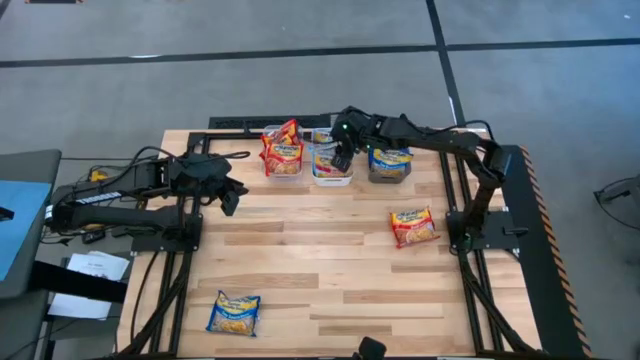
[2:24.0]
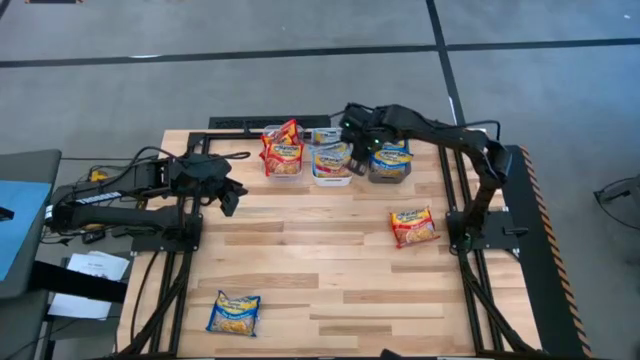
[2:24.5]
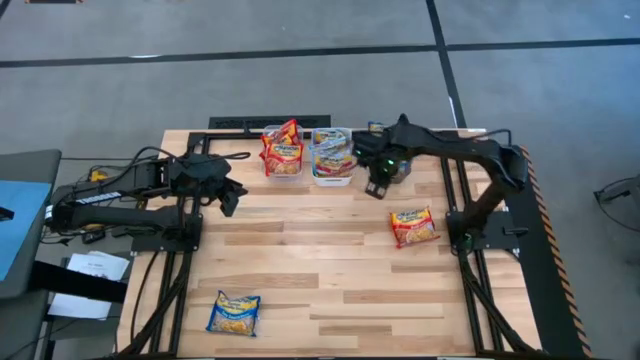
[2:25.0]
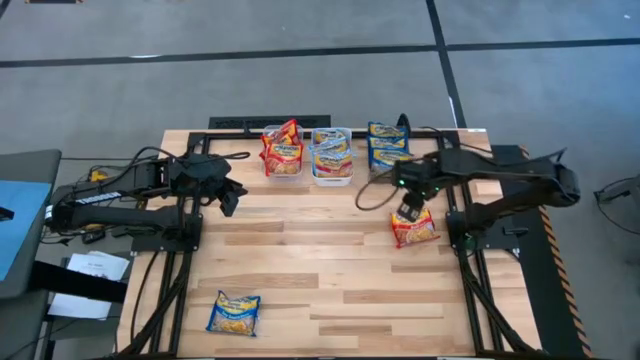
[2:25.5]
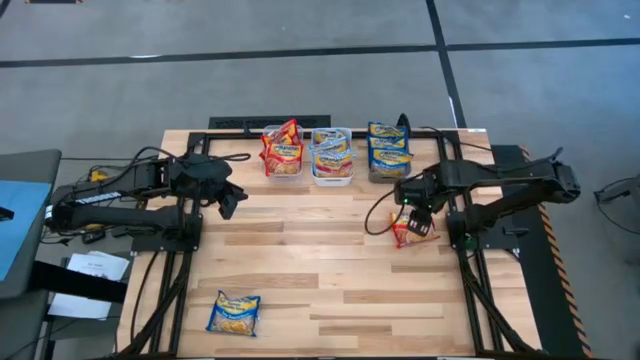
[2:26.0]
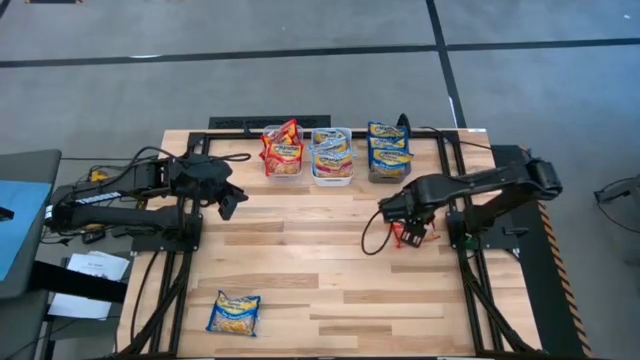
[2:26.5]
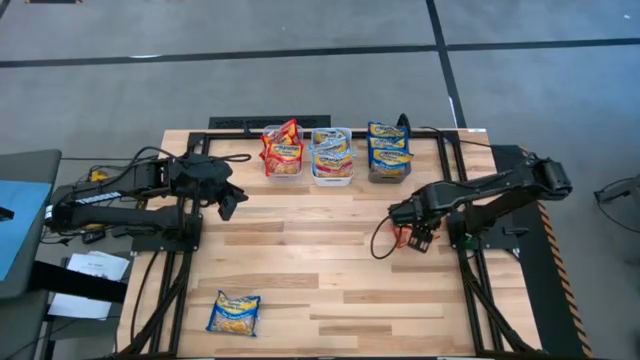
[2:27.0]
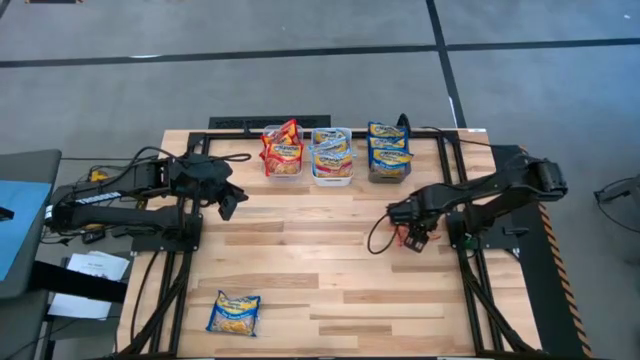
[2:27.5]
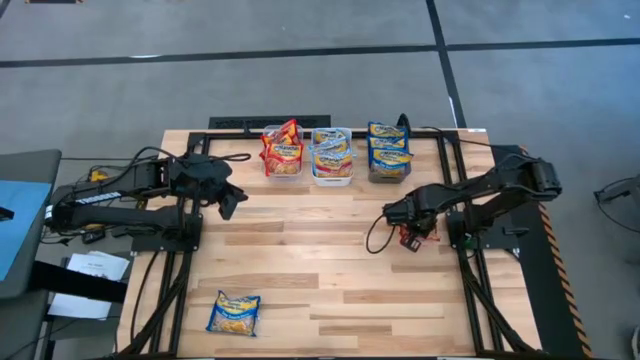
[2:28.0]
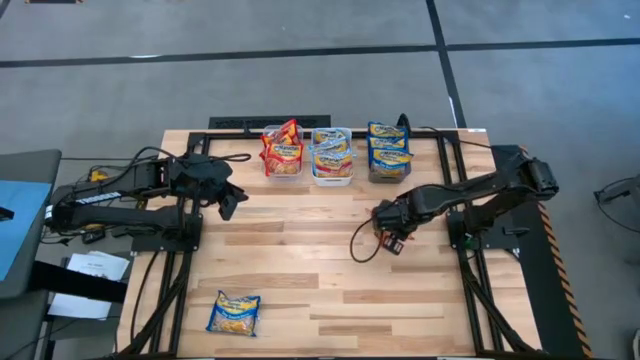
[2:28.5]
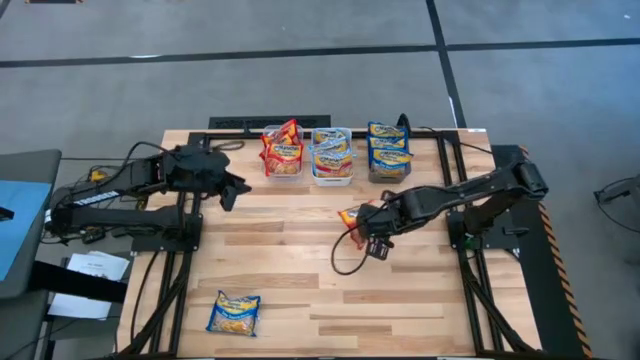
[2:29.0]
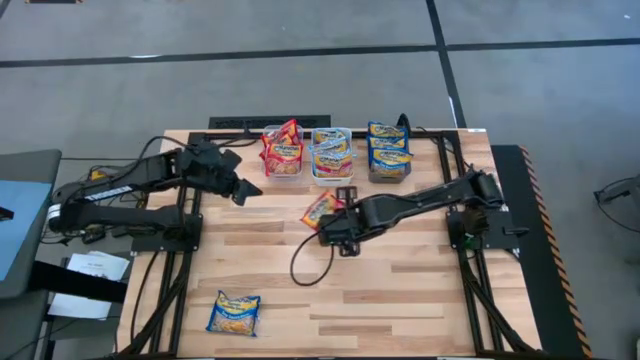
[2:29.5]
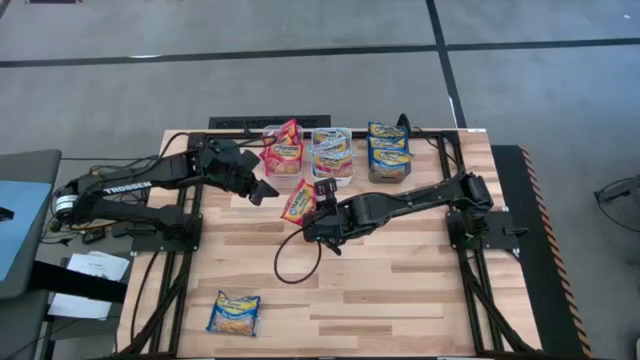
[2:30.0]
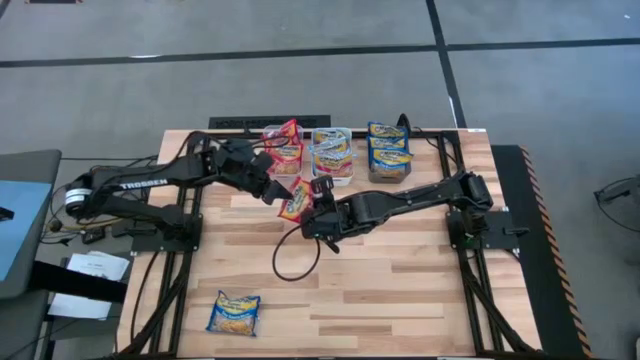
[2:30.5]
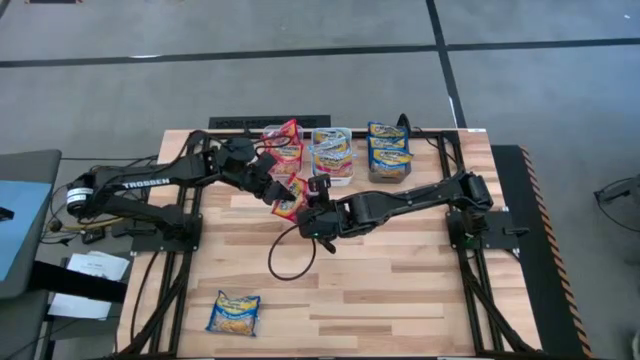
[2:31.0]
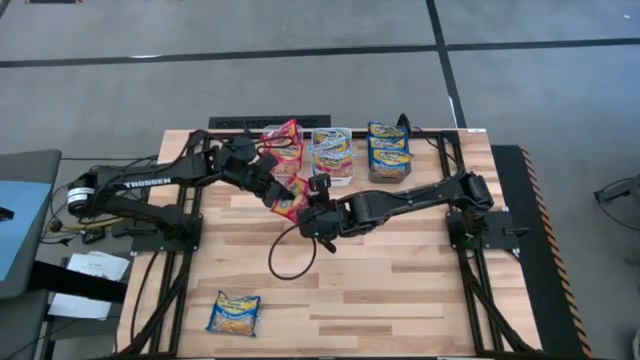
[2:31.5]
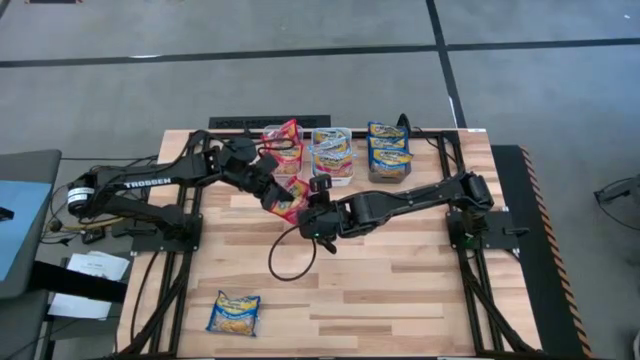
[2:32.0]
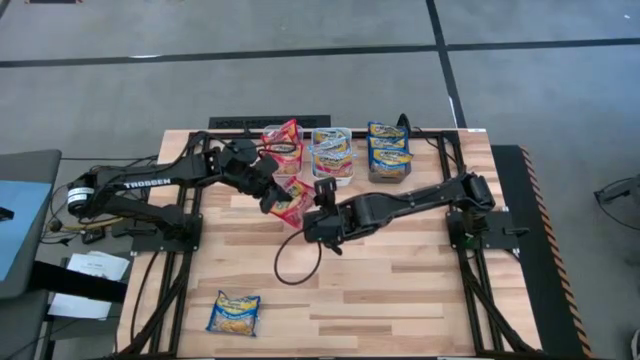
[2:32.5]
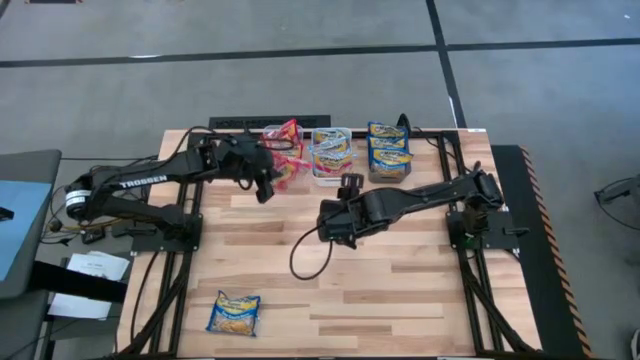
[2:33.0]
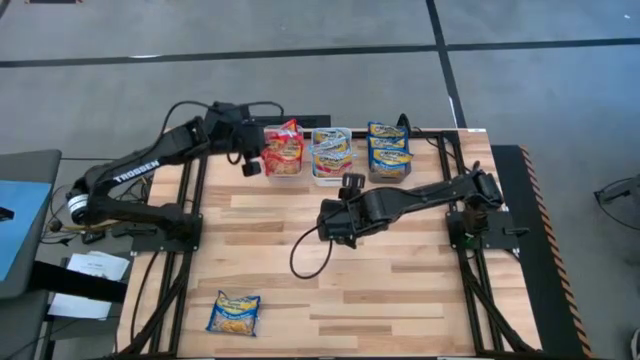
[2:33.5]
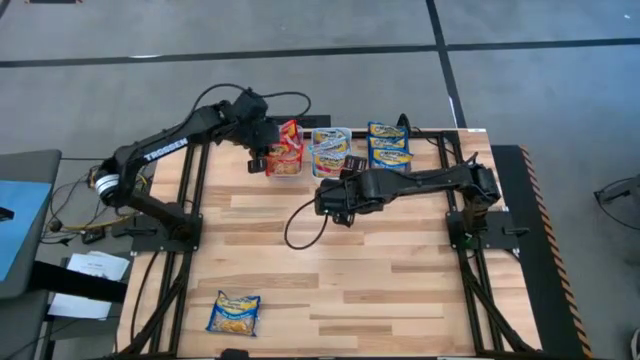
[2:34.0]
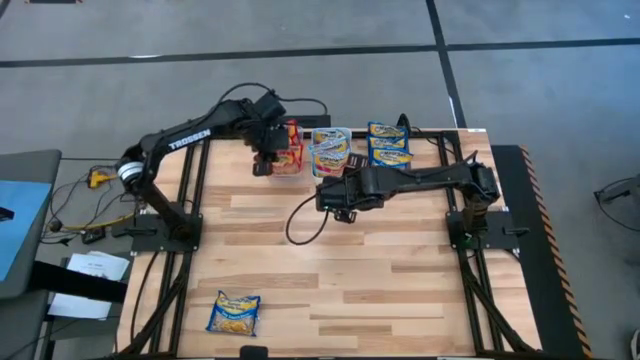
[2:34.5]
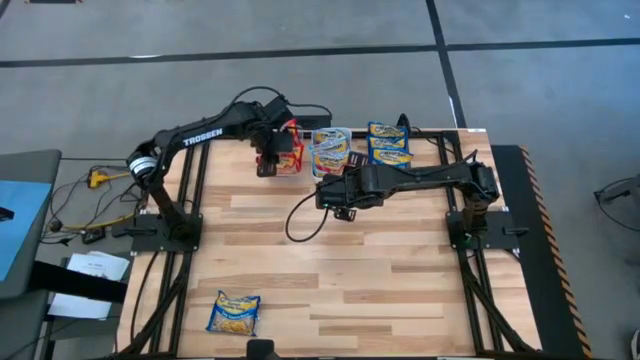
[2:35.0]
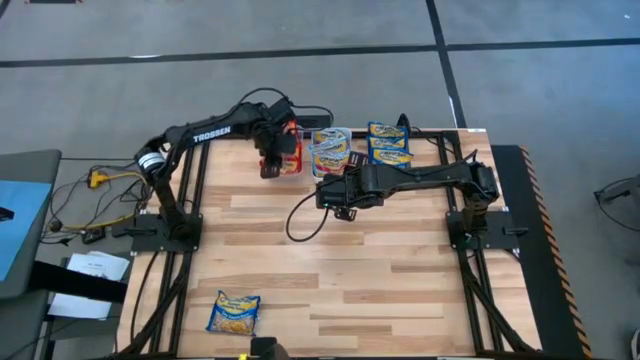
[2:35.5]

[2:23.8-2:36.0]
Task: Sort Maruchan noodles
Put the red noodle pack into the transparent bin

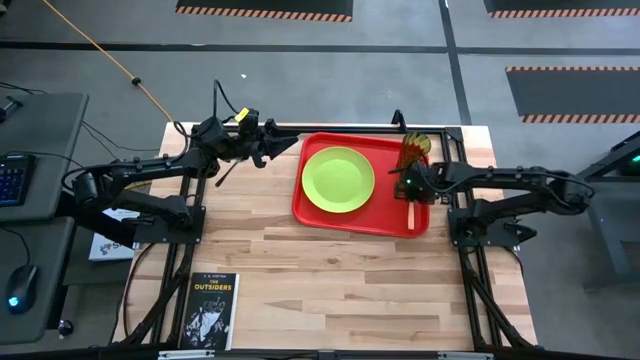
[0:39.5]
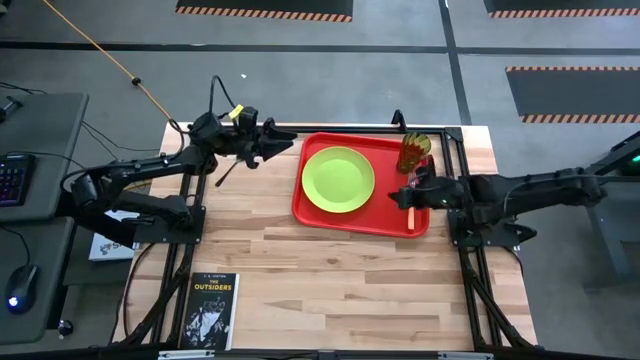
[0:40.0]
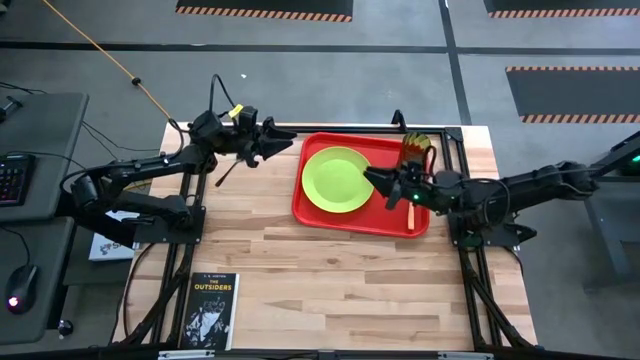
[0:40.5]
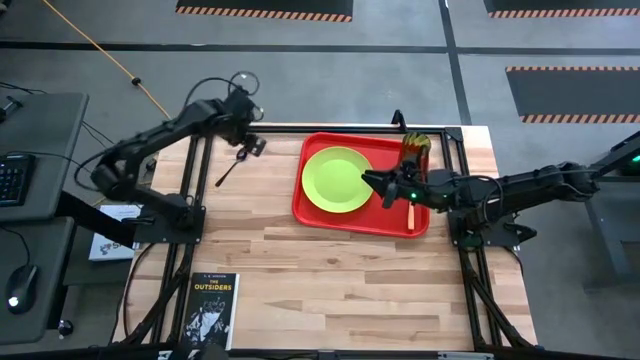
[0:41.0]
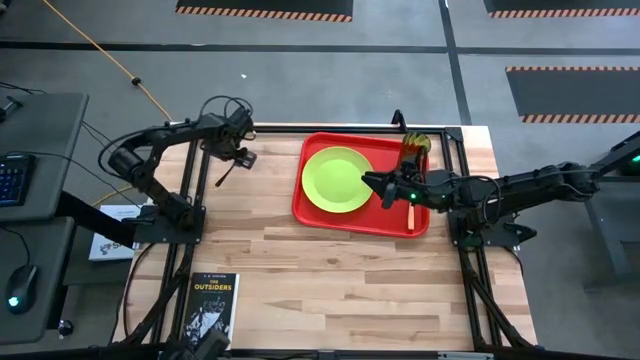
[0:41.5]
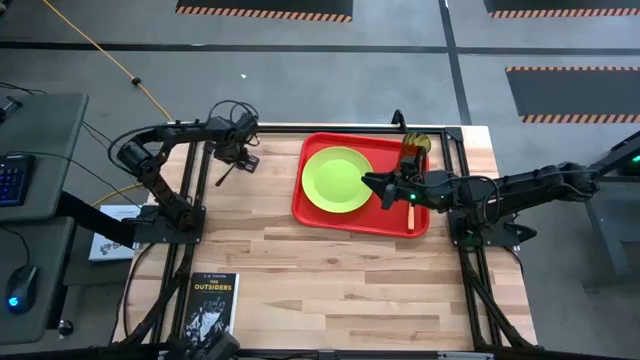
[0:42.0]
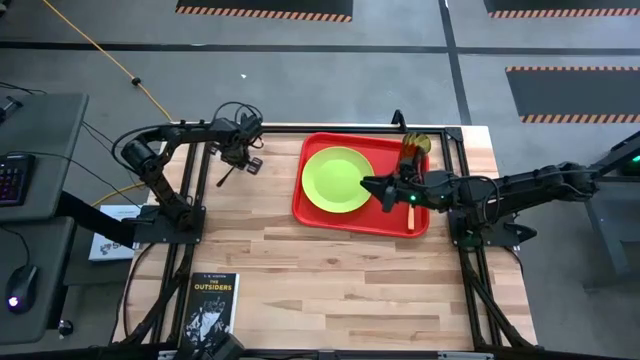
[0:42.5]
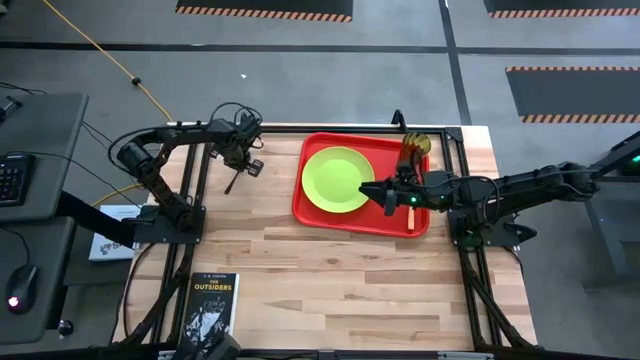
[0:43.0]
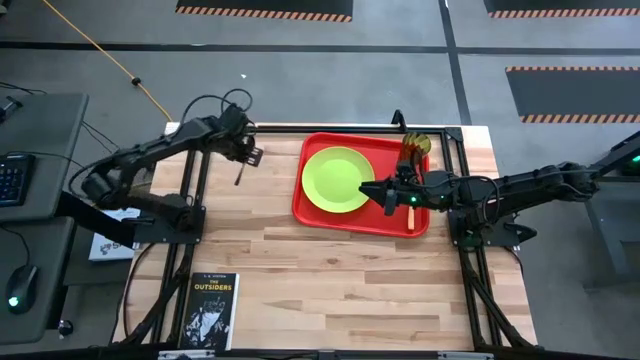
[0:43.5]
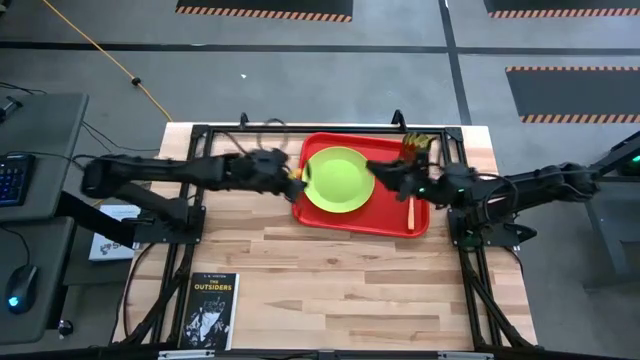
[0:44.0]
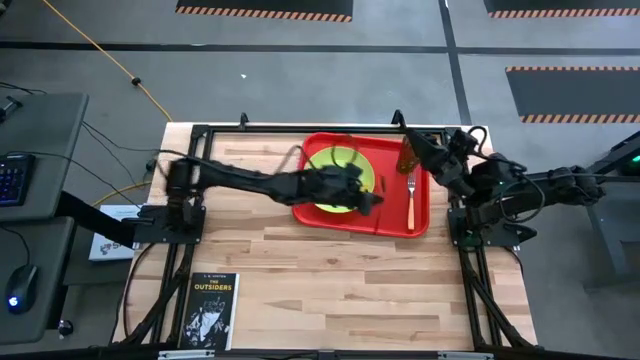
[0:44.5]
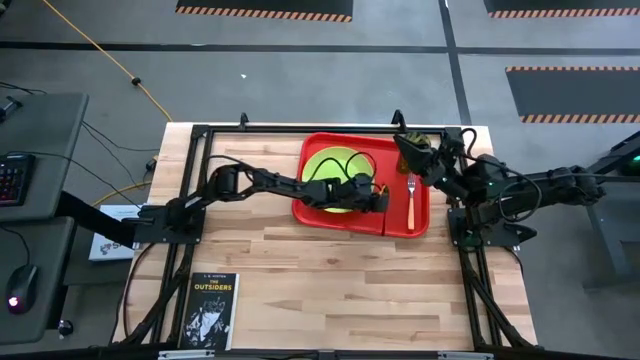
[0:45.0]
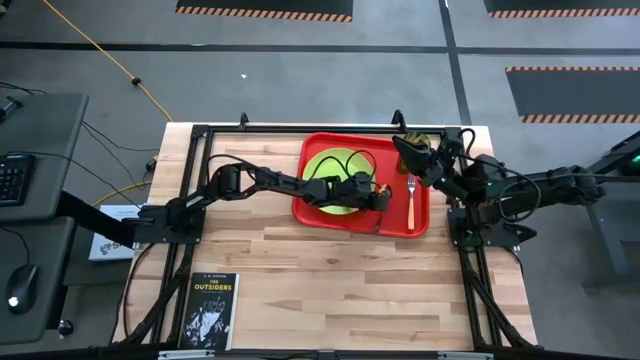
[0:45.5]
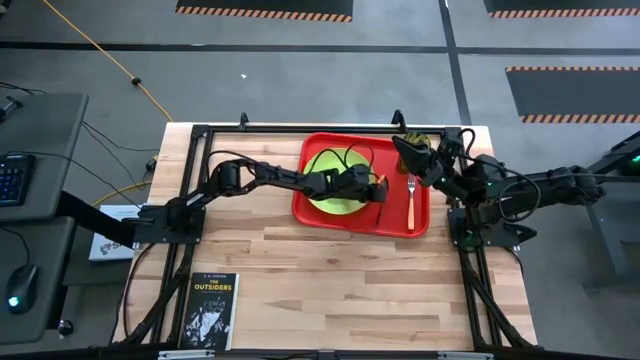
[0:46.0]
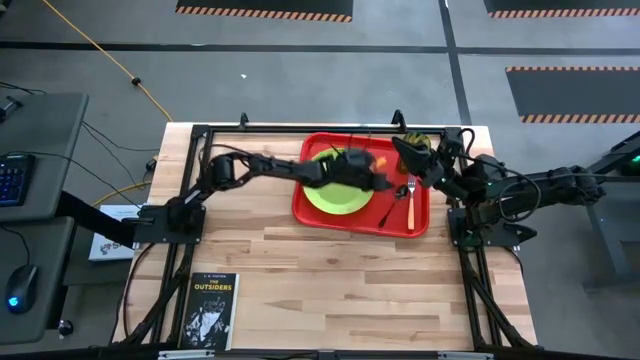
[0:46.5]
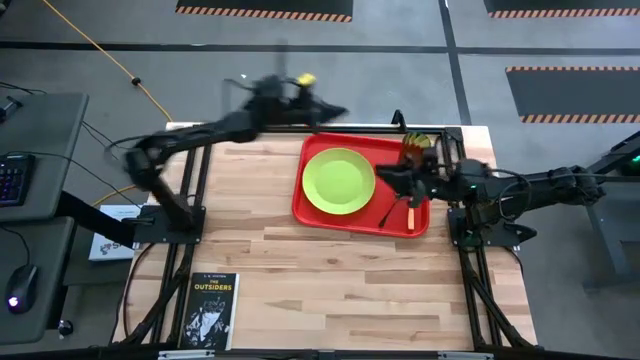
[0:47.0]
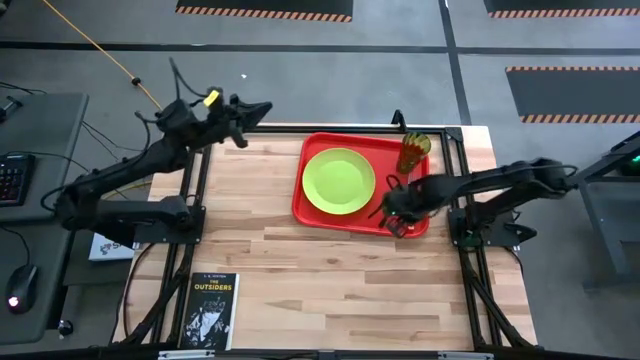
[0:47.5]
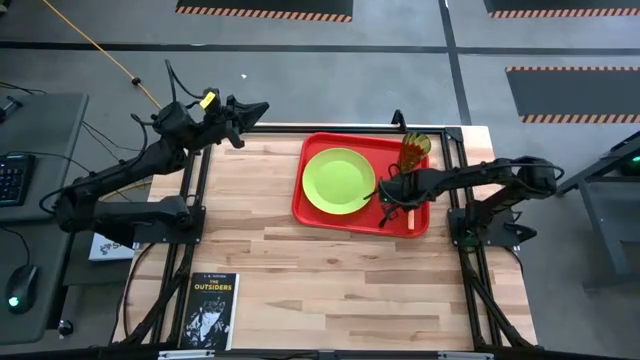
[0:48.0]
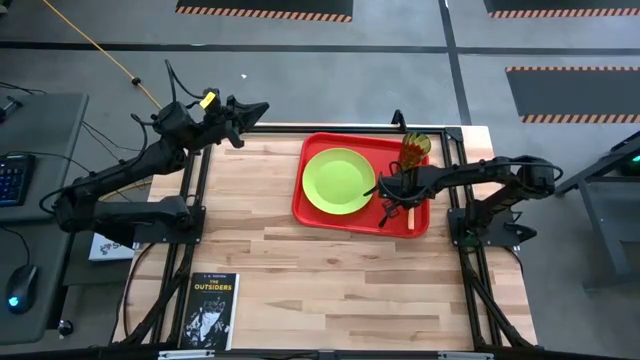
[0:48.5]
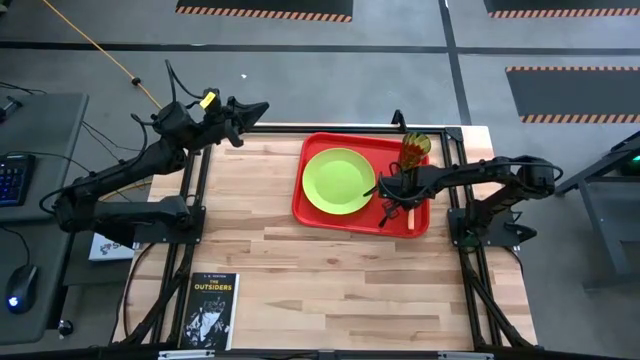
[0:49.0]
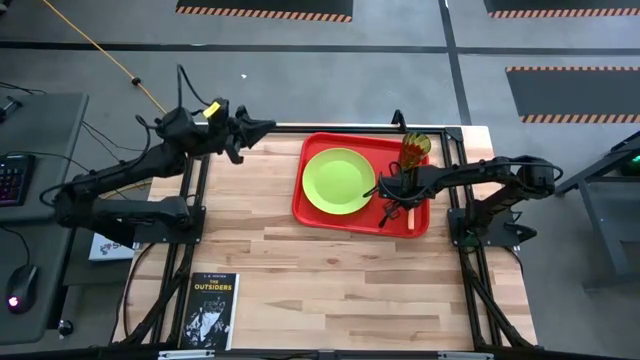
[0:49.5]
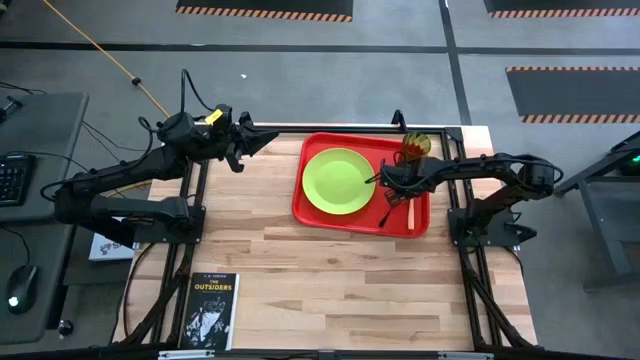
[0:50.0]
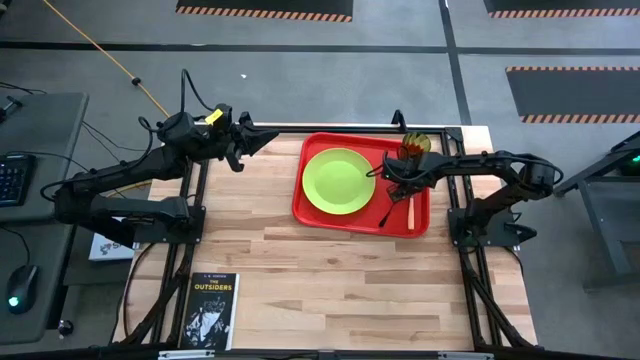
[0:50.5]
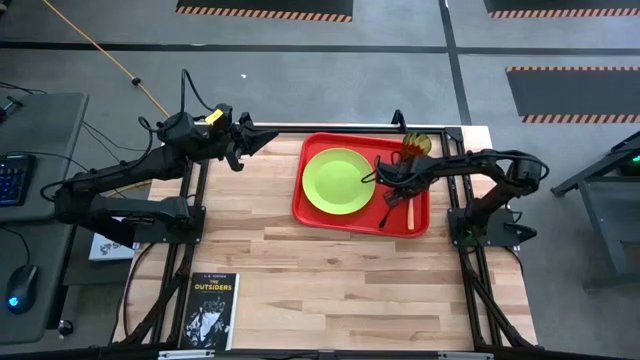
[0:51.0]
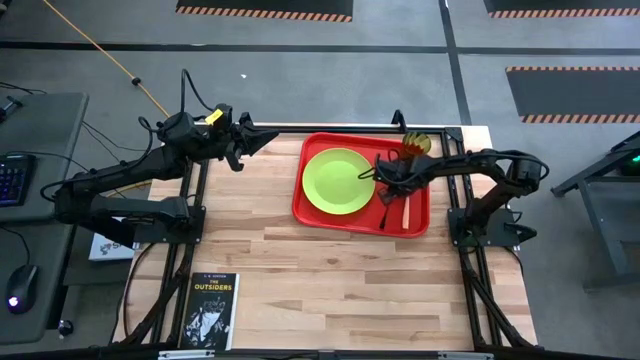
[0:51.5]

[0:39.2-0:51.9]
Task: Pick and place plate/cup/fork/spoon on tray
Put the black spoon to the right of the green plate on the red tray
